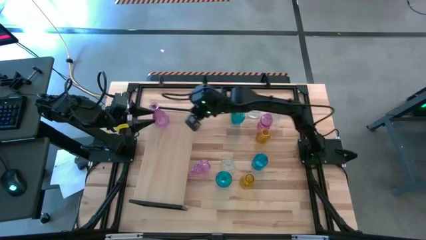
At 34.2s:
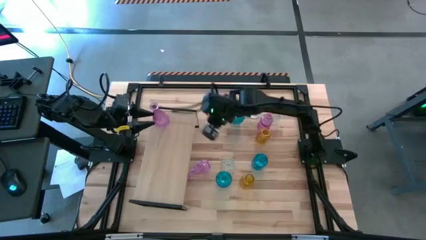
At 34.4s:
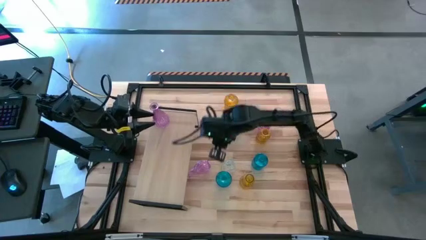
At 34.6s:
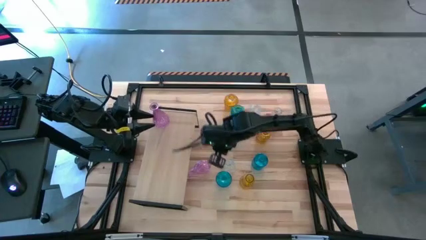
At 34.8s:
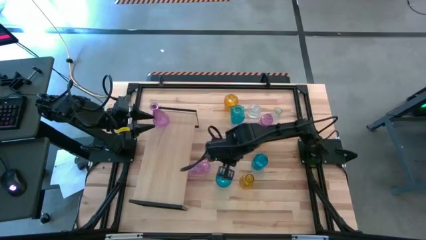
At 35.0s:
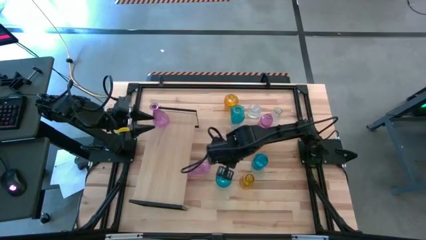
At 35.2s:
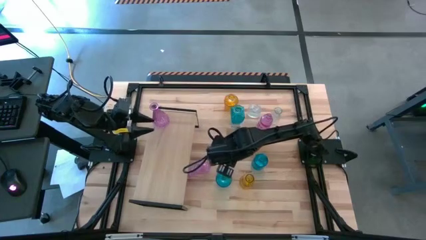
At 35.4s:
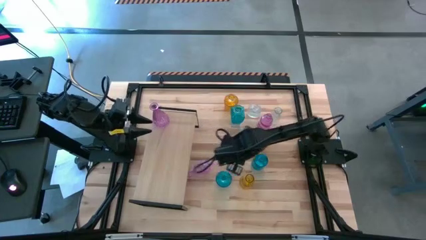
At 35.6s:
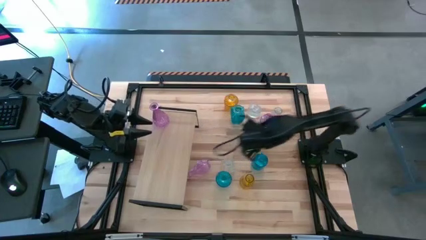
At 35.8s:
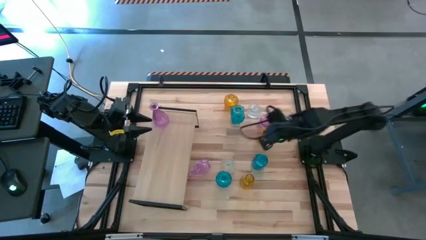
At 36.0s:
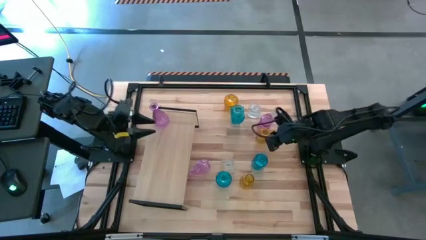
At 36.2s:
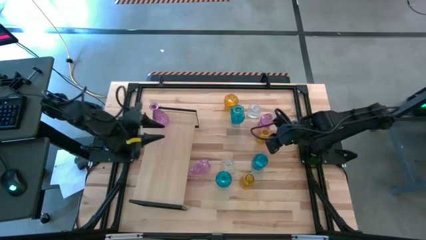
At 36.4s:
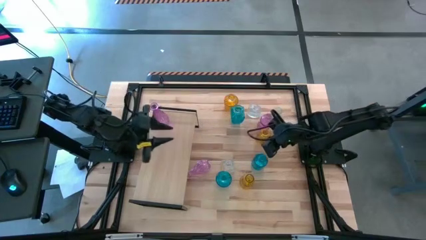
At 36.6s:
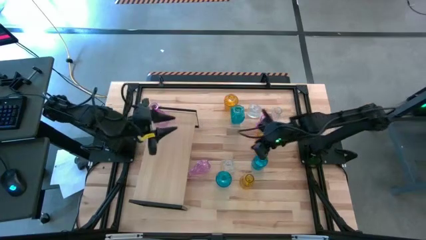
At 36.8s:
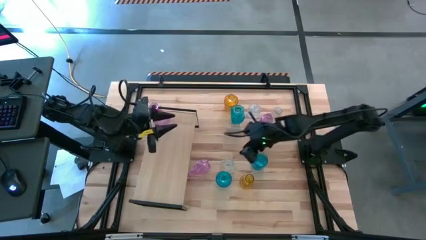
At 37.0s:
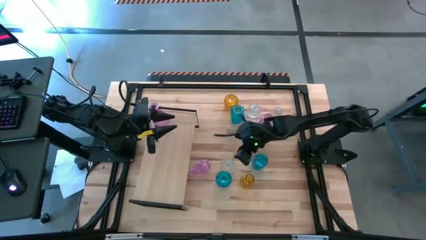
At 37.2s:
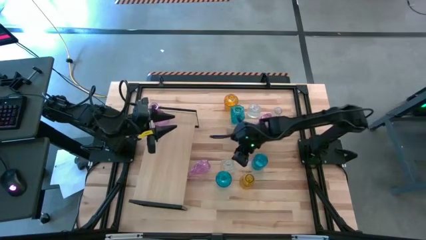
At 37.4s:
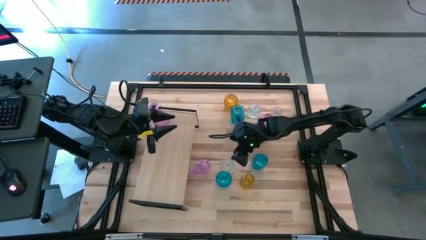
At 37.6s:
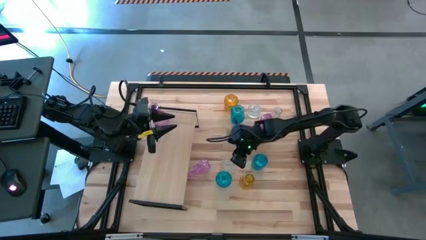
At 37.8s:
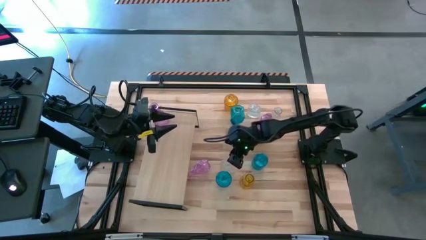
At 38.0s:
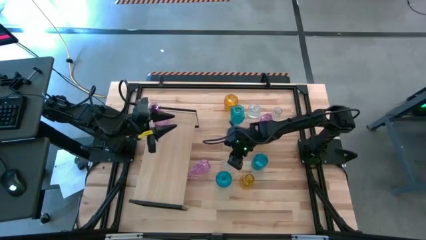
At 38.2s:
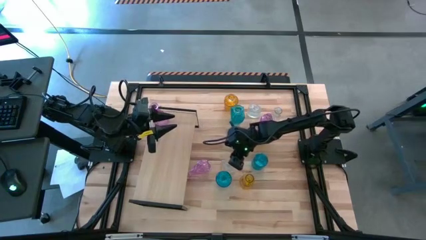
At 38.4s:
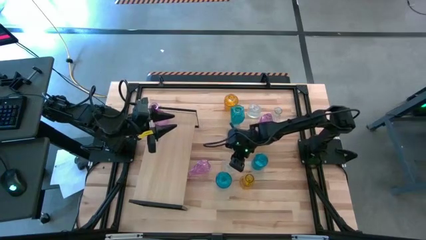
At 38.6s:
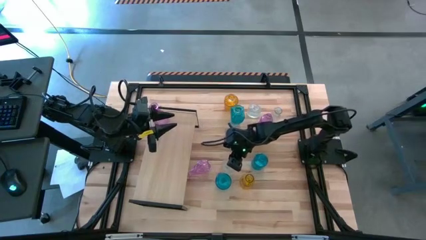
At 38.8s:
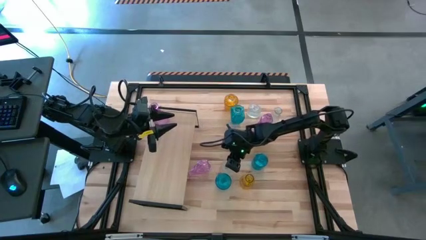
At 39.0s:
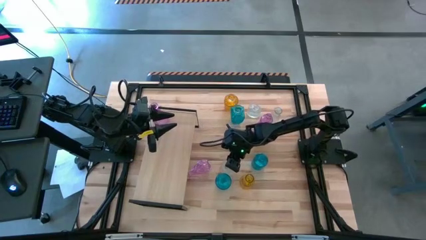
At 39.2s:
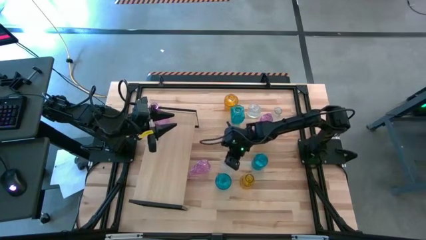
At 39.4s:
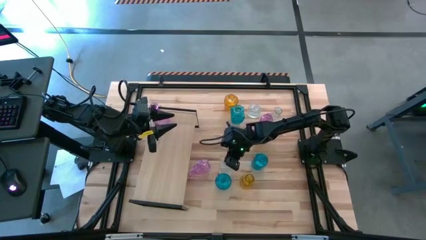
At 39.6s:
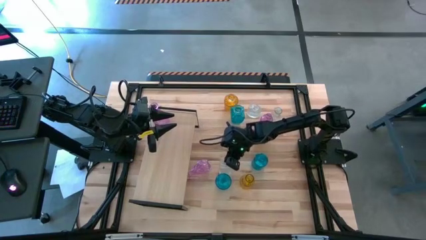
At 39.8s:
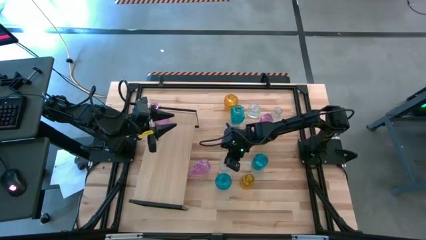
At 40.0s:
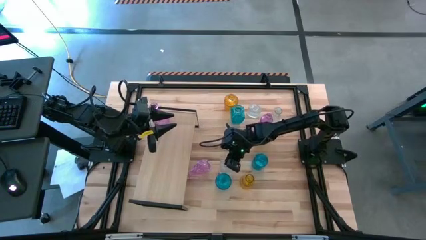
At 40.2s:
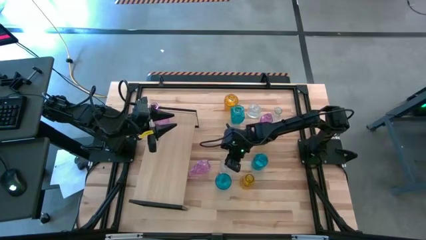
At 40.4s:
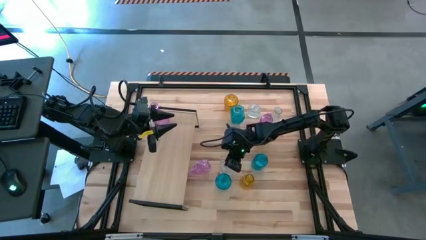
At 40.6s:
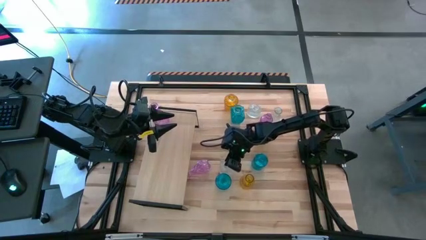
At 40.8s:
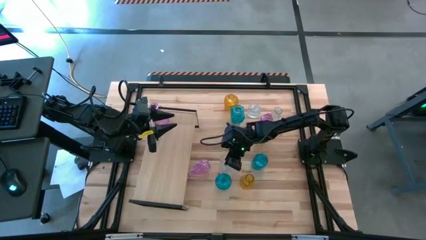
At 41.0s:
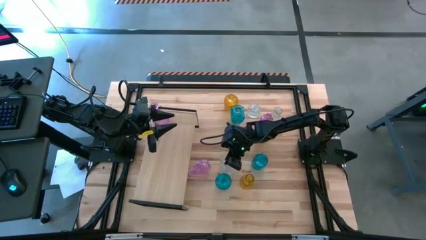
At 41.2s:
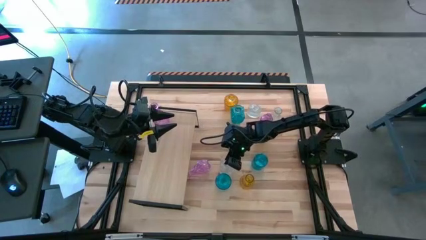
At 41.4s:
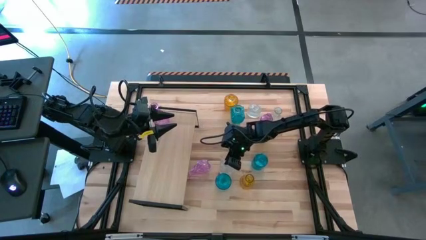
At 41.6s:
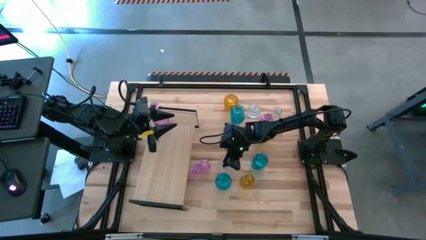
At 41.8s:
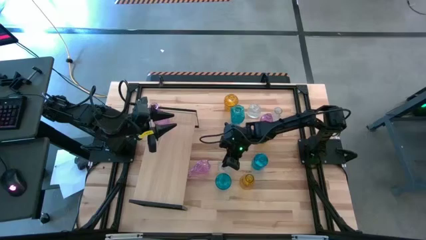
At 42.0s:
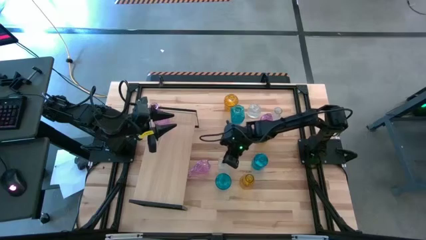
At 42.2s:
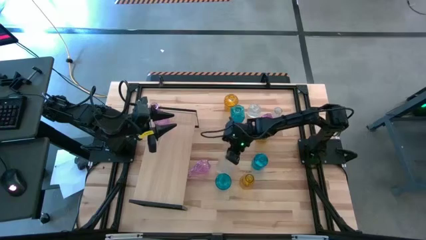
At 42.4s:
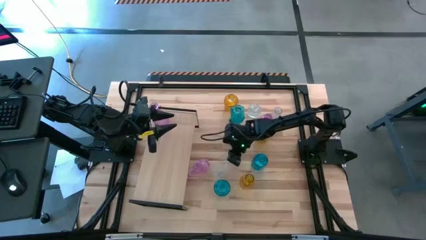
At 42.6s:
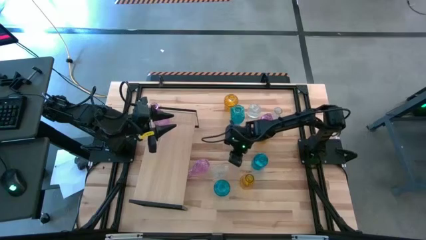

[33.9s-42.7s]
Task: sort vases onto shelf
Put the bottom left transparent flower vase on the shelf

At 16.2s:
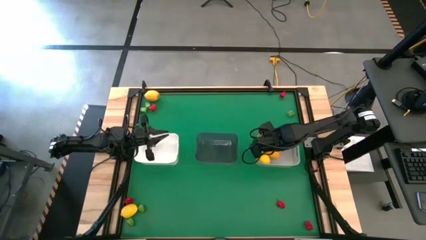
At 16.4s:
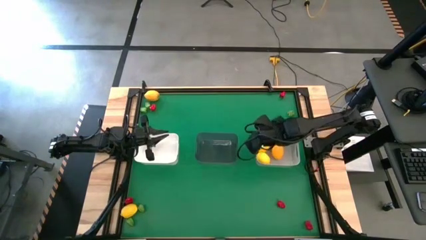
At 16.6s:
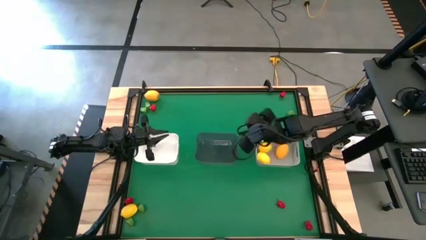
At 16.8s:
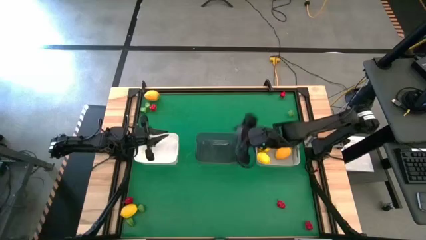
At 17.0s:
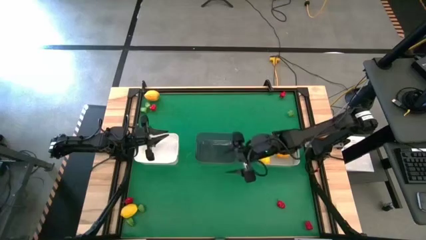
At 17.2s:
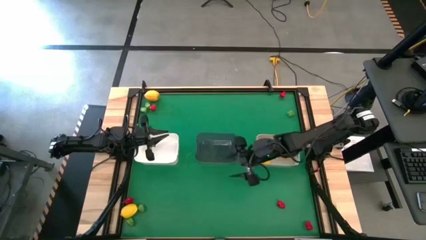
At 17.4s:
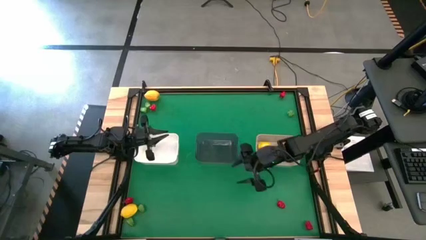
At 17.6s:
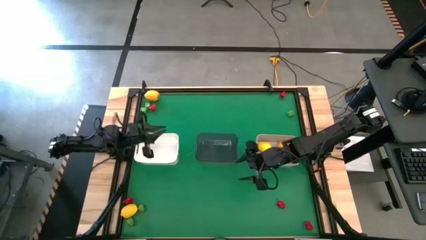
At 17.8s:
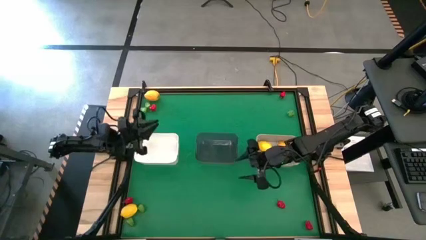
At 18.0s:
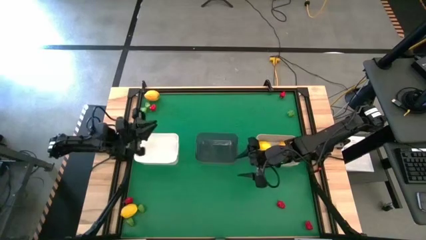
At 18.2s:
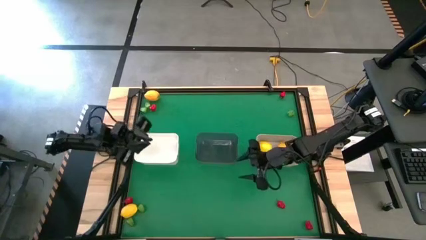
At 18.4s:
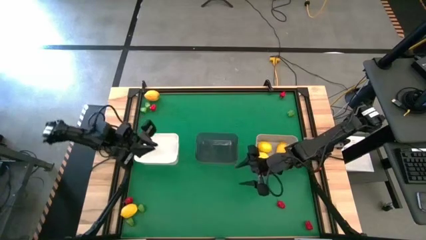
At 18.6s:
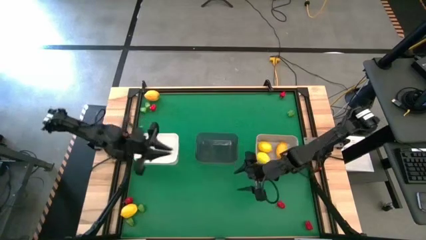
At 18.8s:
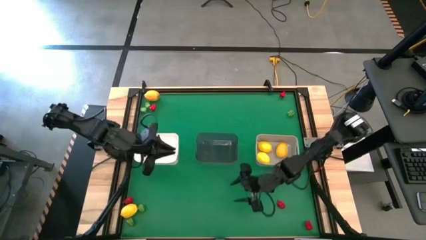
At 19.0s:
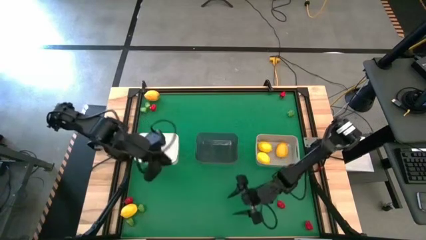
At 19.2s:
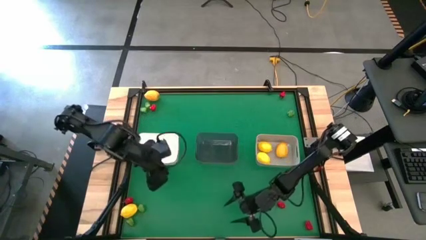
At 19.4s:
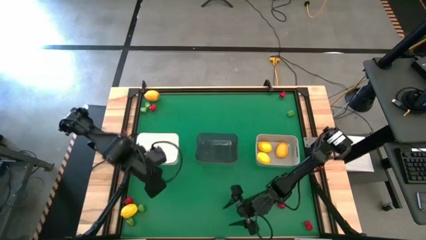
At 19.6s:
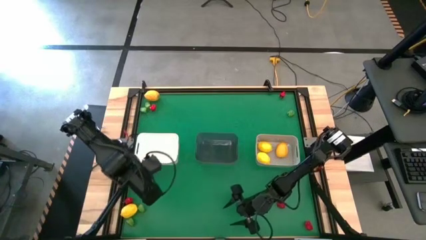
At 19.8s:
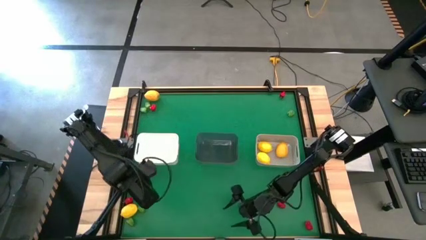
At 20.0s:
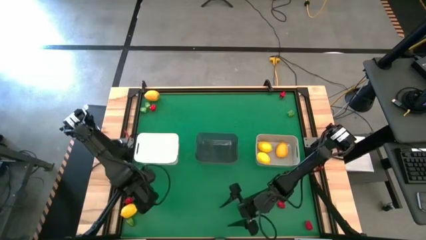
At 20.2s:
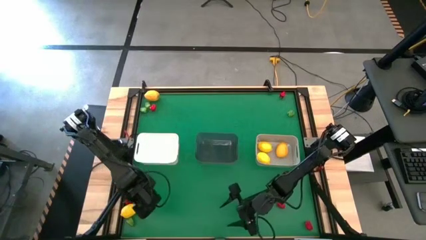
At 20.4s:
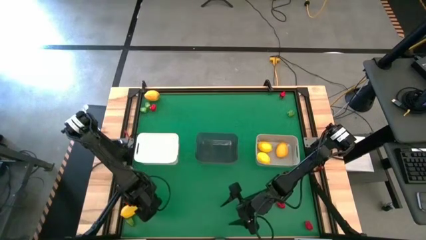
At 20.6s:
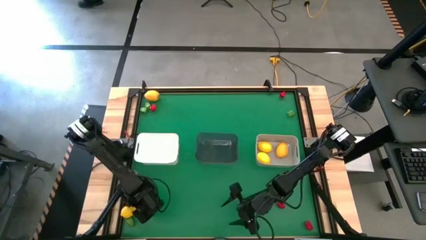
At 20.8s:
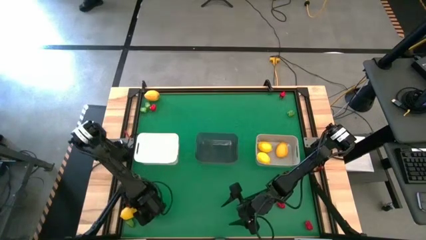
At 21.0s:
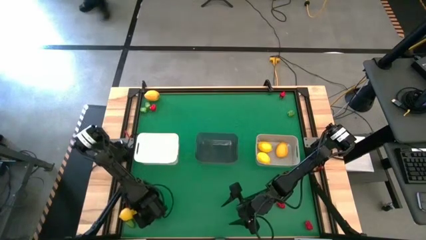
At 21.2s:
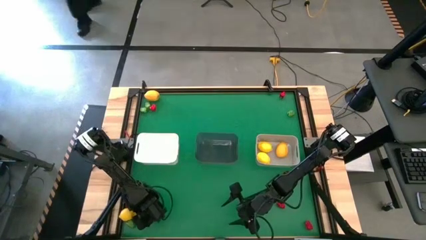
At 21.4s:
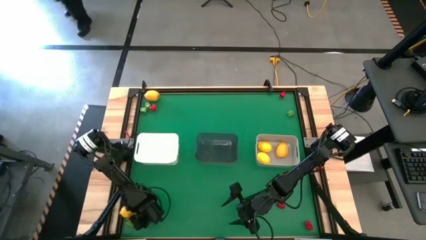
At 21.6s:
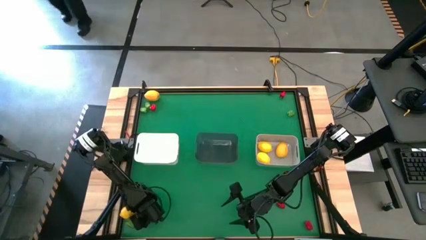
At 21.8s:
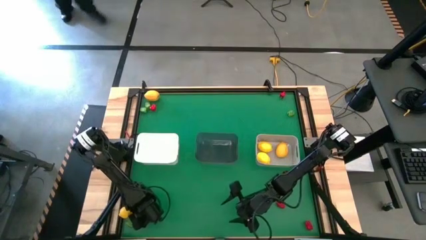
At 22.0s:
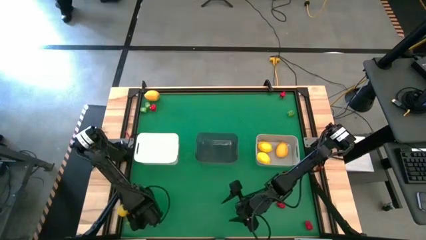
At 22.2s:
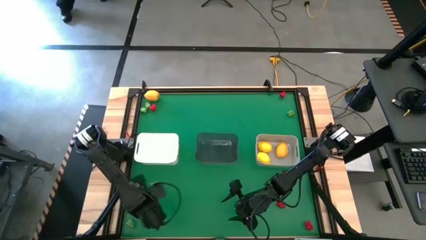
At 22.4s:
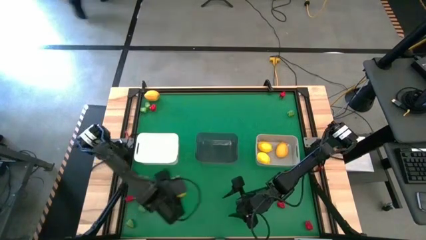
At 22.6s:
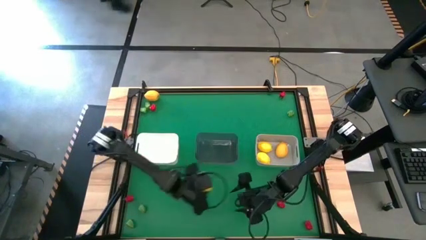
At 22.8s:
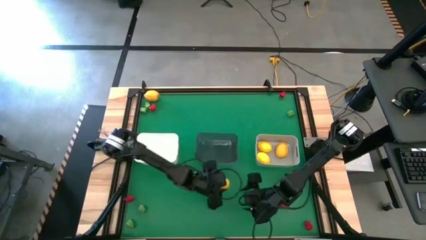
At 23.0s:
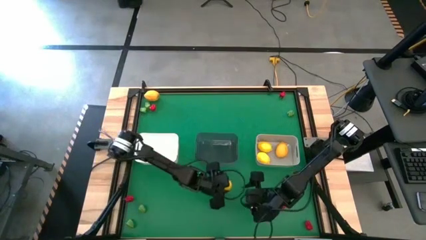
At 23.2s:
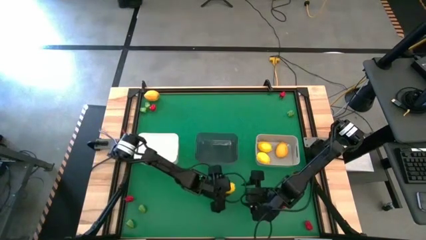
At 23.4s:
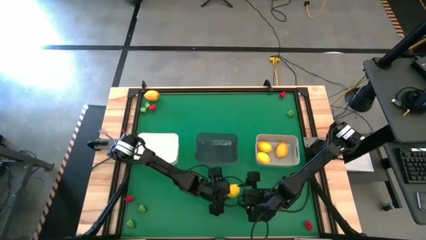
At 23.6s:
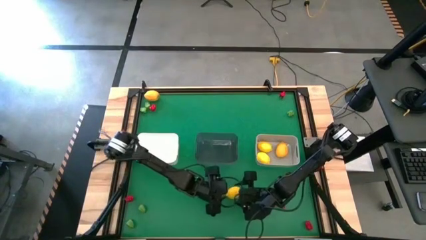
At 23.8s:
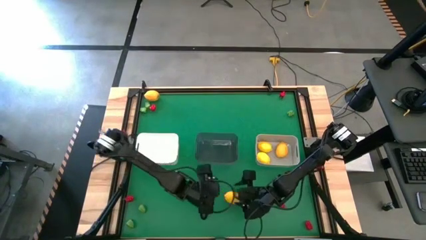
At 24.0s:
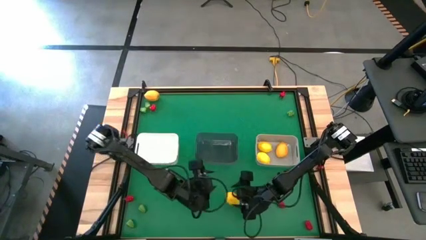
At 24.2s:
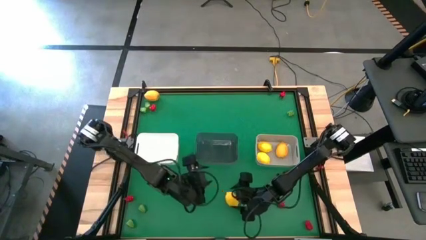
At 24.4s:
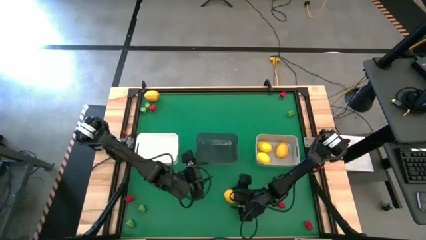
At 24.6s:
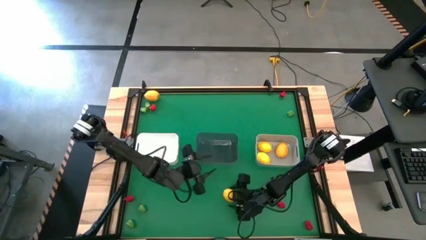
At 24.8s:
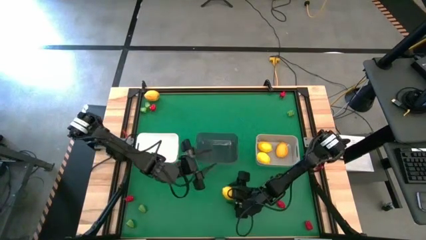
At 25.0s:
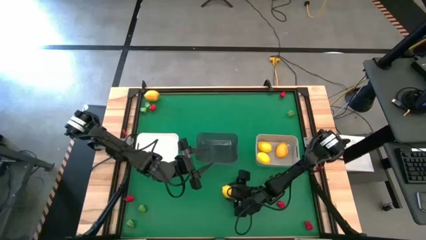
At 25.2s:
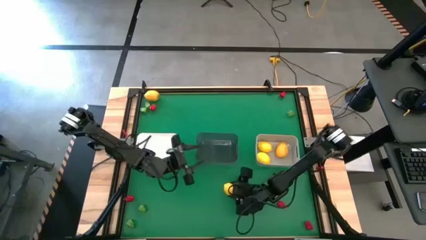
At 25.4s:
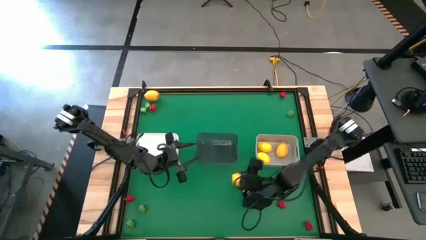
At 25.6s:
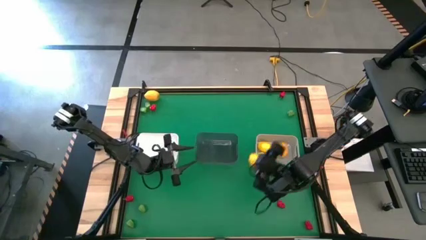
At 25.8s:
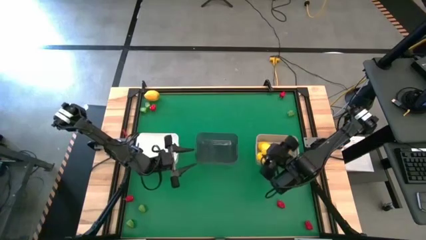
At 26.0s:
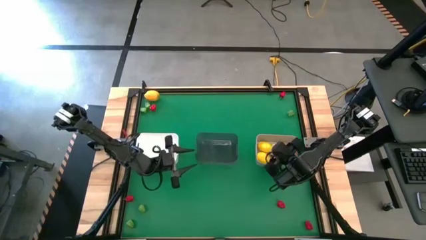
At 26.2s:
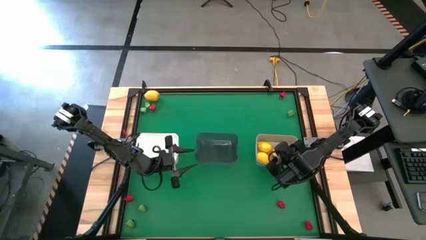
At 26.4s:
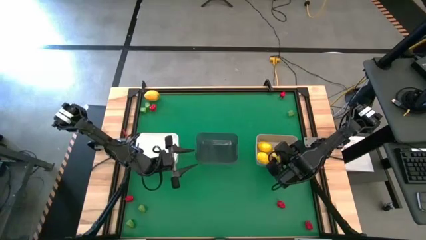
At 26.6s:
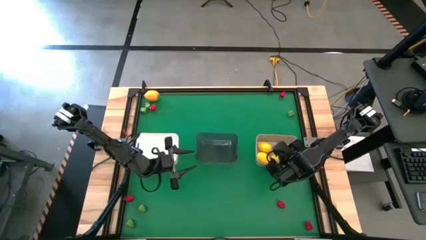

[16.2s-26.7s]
Task: Sort produce into baskets
Put the yellow lemon into the gray bin
